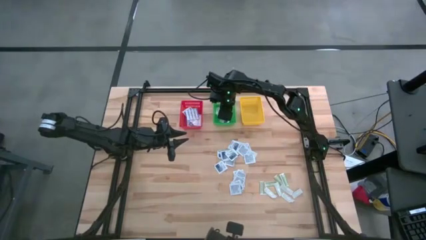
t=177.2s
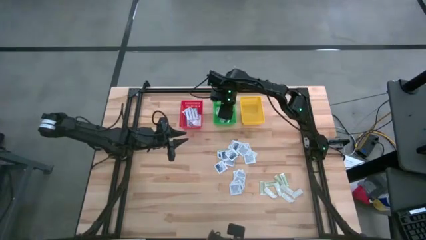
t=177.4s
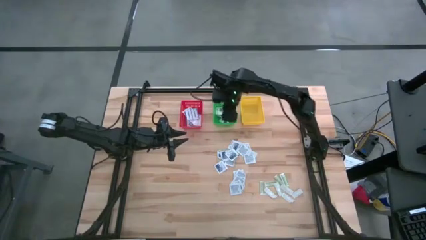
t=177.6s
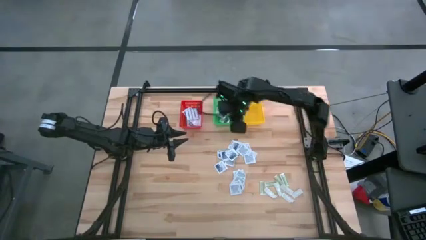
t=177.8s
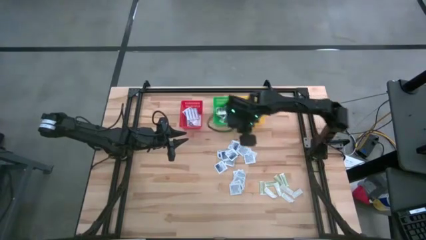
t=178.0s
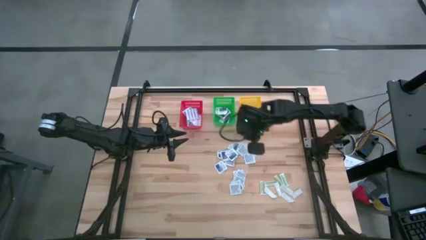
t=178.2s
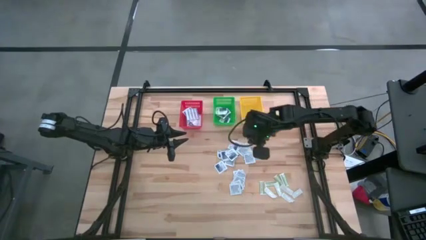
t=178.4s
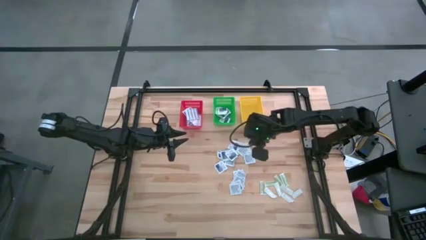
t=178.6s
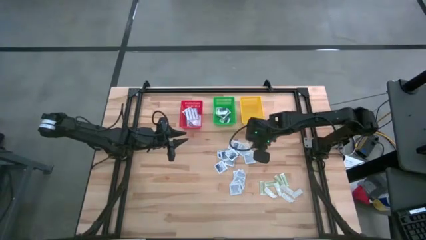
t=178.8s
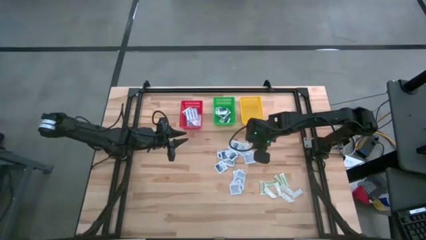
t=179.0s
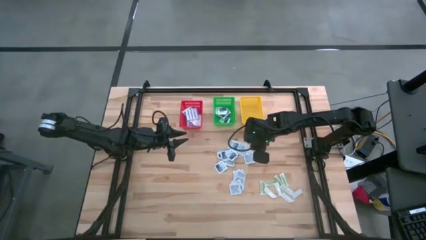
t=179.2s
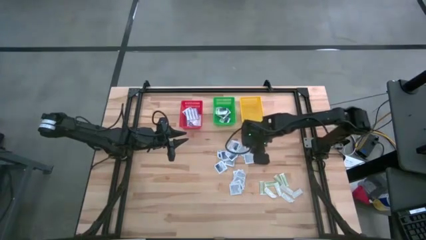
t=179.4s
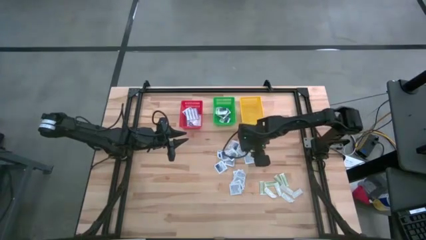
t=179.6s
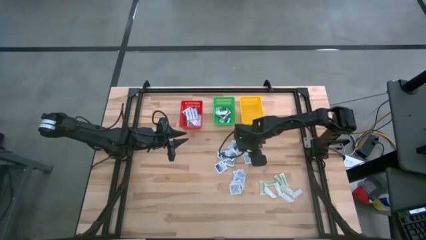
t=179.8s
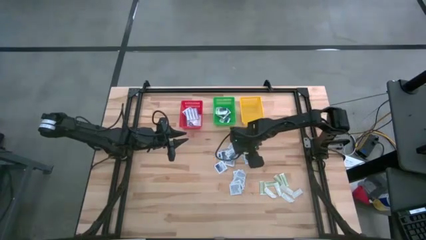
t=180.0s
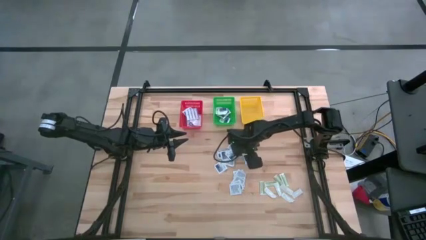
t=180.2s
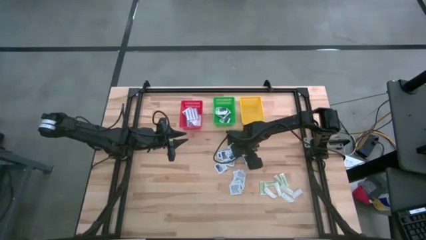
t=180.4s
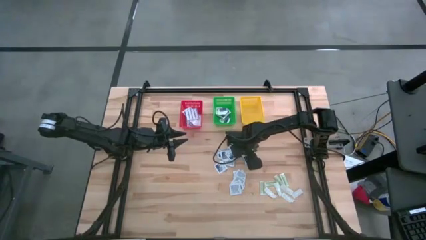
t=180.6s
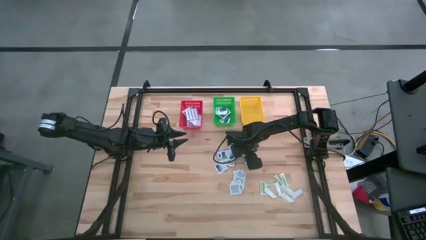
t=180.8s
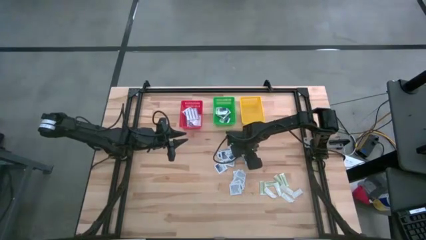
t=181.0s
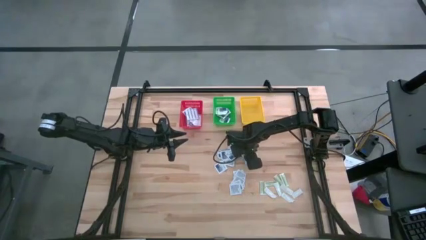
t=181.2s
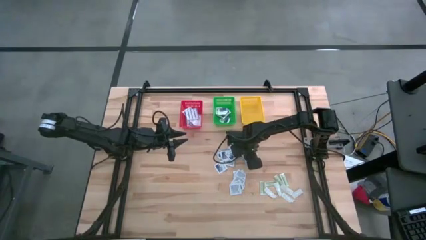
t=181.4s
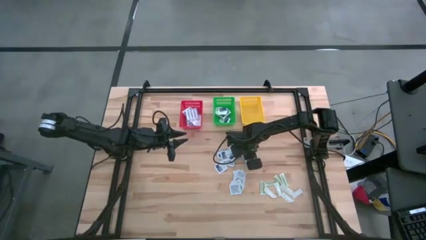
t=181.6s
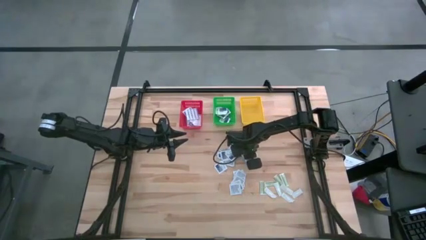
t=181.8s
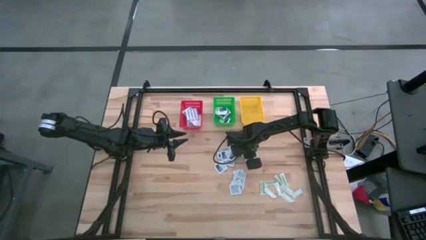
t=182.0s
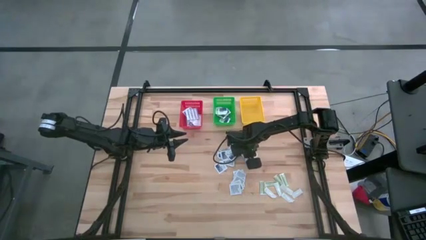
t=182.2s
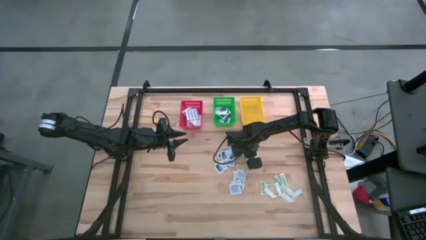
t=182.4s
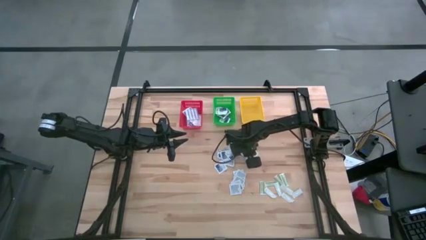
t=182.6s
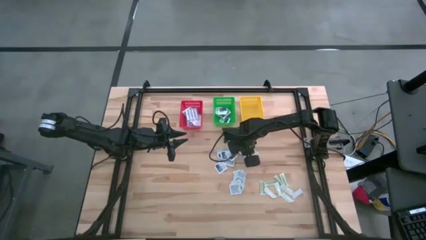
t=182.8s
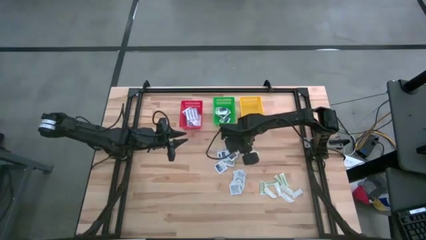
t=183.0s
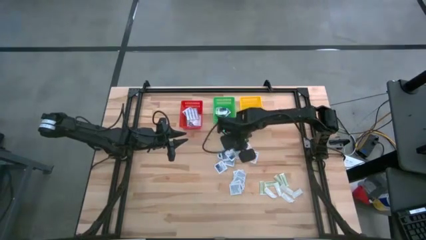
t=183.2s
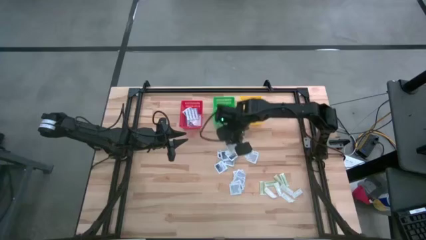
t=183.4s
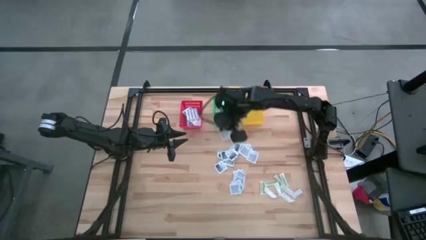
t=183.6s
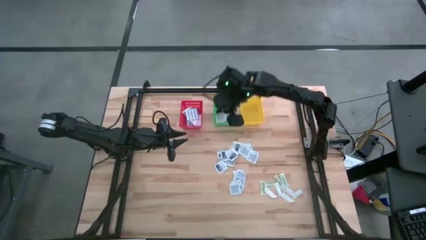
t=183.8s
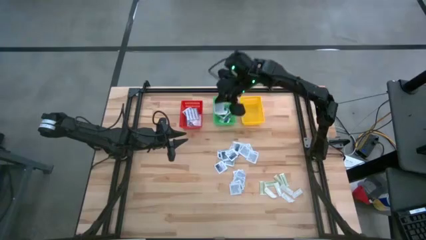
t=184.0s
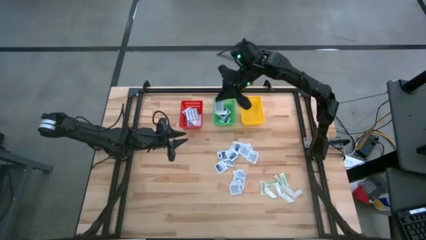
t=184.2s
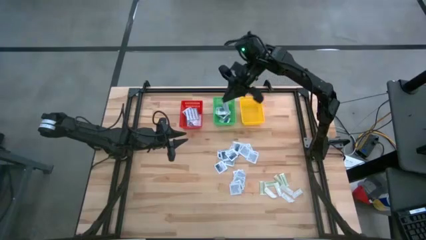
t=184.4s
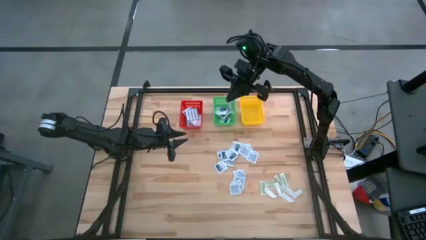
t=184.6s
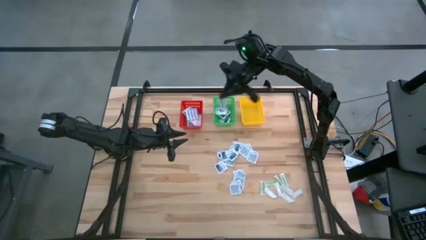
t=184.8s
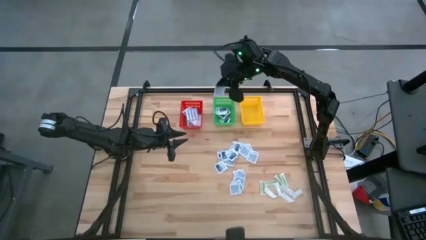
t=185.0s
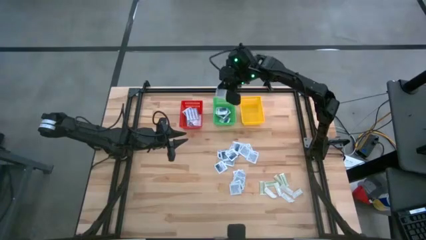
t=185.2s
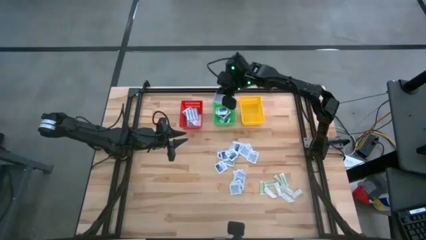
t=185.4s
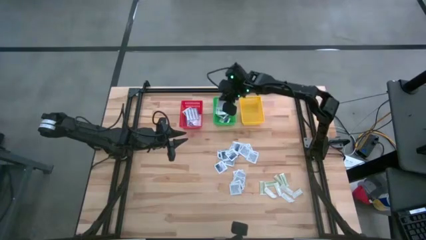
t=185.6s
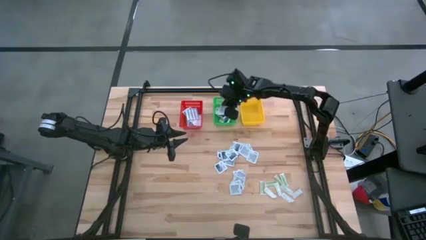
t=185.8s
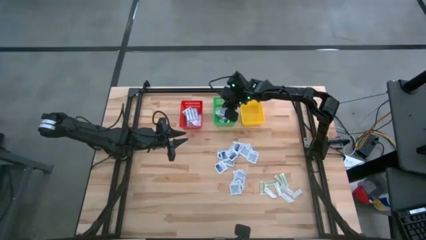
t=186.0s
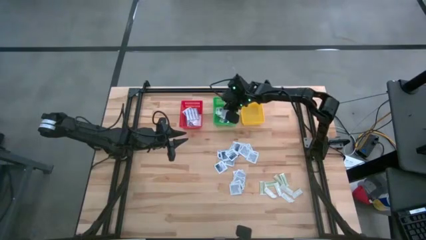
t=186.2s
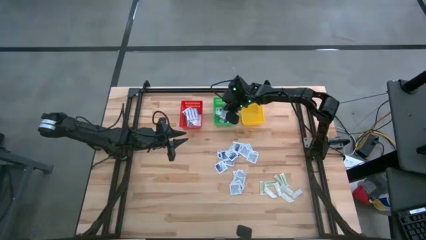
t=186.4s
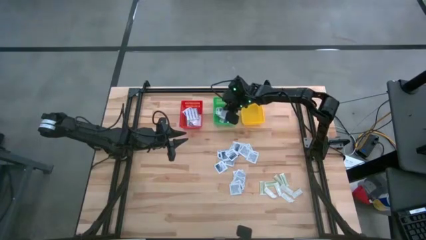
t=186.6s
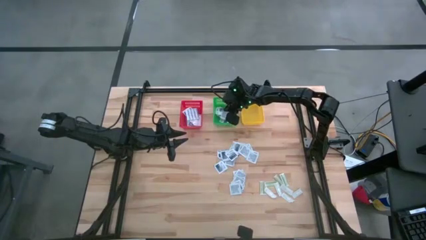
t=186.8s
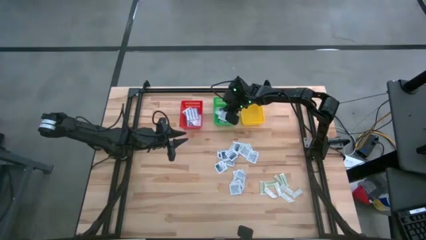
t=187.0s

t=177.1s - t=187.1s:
Task: Pick & Place First Aid Supplies
Put the alcohol pad into the green basket

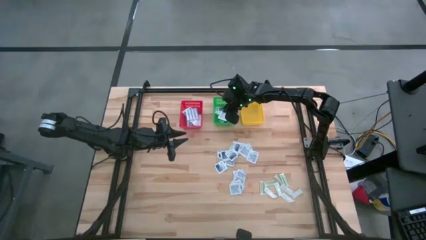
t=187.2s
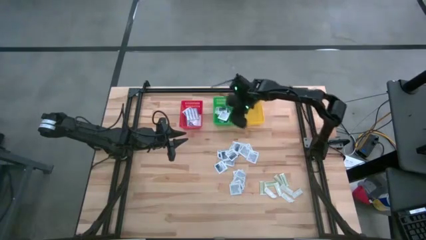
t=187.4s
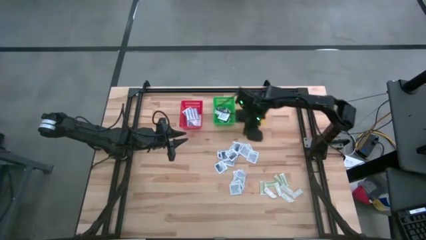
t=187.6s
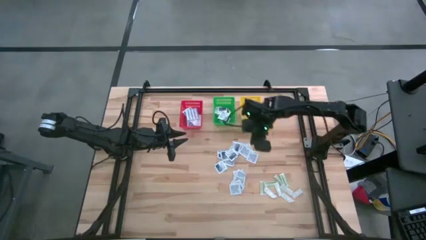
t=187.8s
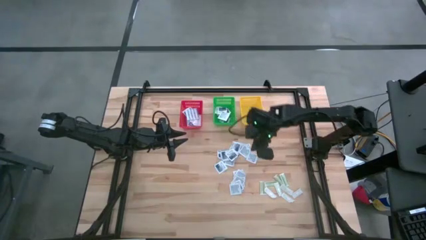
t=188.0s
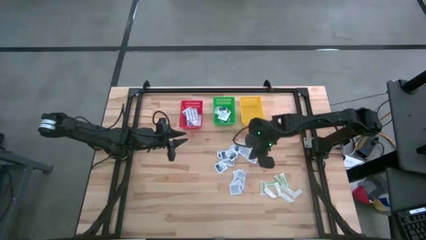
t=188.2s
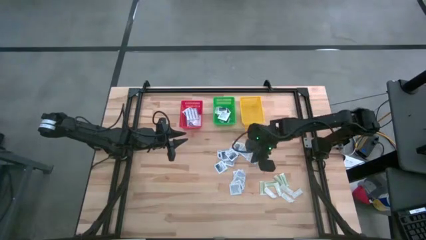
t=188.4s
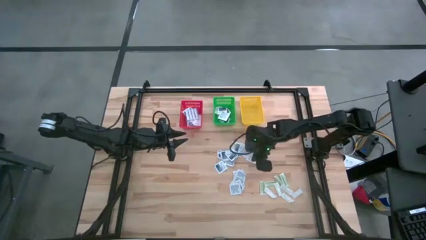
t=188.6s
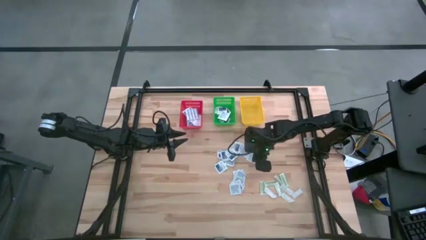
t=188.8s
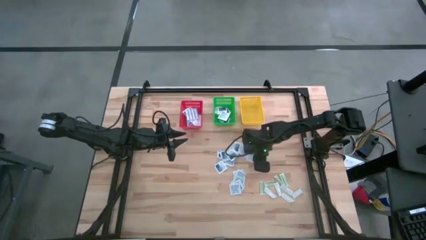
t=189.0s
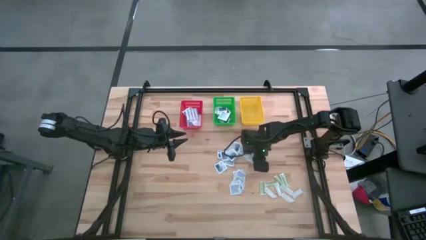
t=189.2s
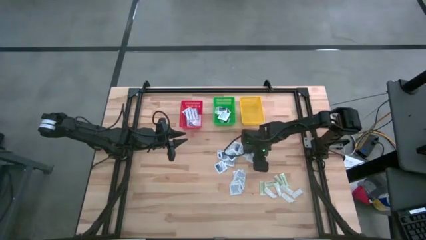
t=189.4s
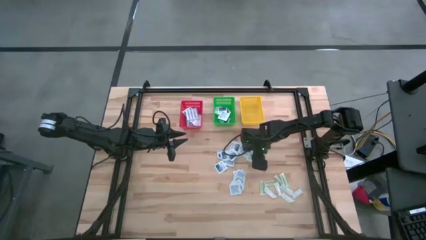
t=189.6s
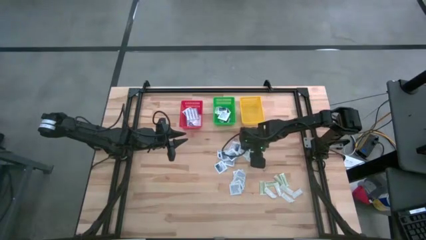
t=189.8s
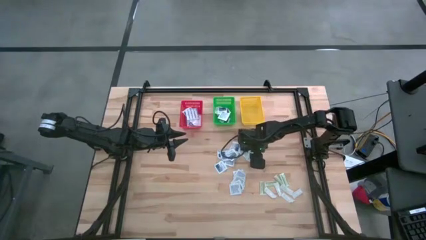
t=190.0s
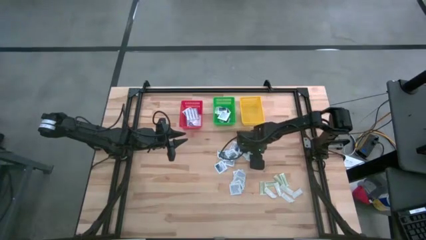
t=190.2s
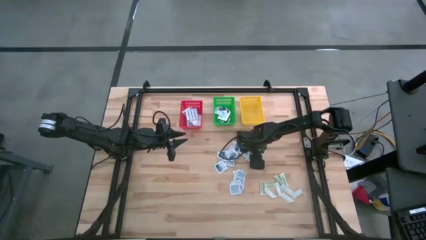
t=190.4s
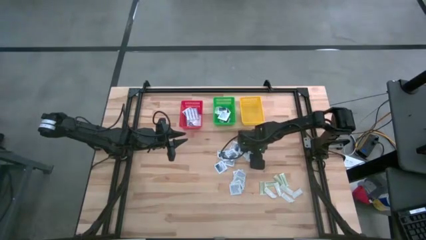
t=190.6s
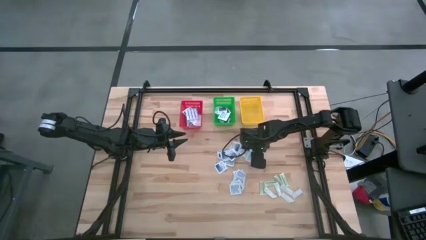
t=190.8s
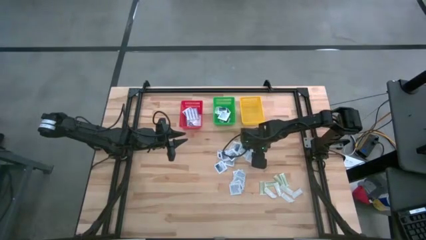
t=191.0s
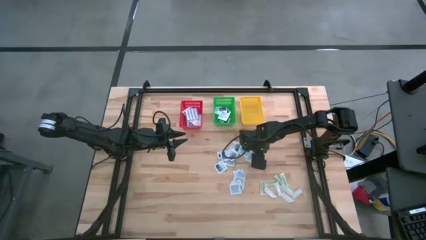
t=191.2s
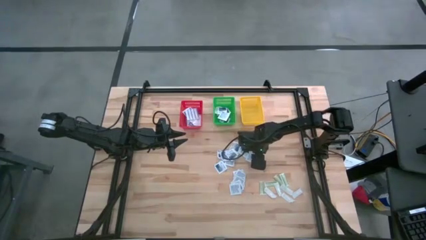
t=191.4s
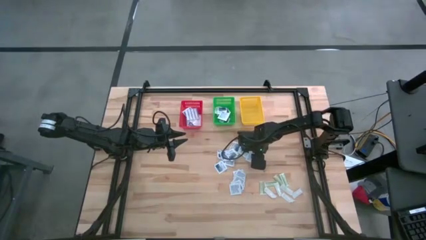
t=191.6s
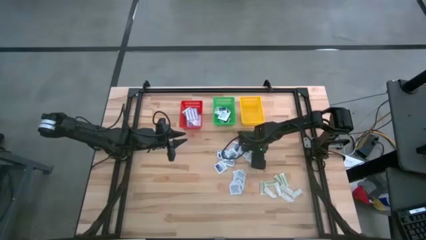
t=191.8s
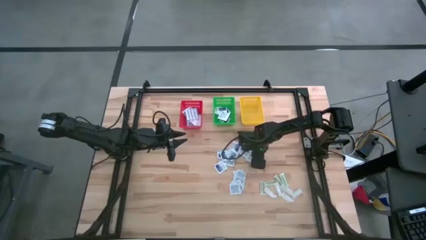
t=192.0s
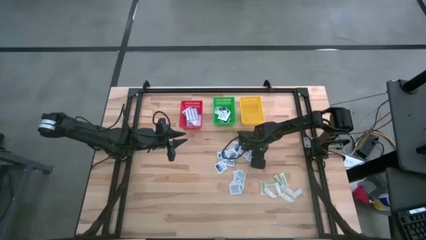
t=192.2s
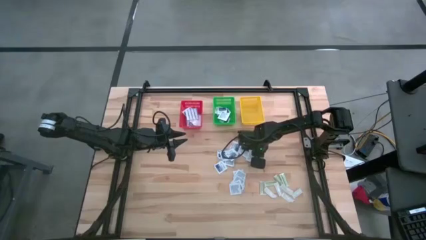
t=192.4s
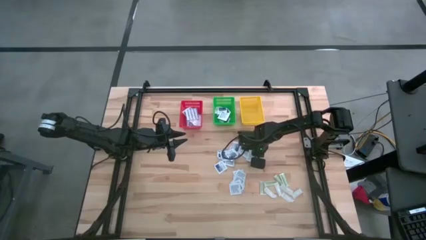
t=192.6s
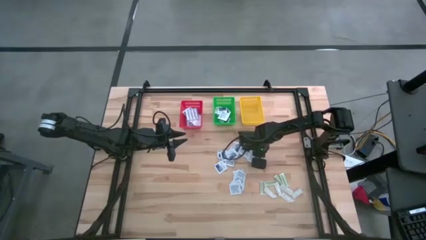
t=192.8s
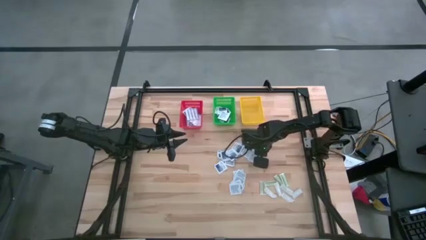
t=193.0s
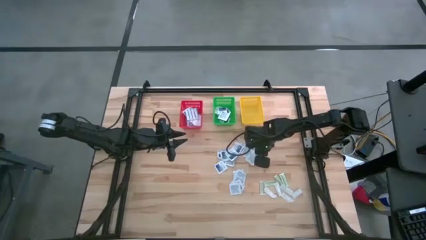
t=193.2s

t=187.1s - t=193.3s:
Put the alcohol pad into the green basket
